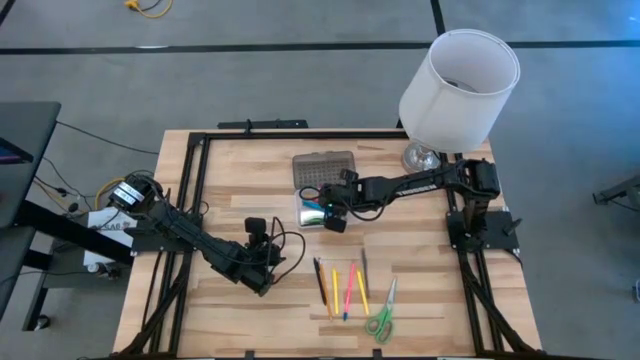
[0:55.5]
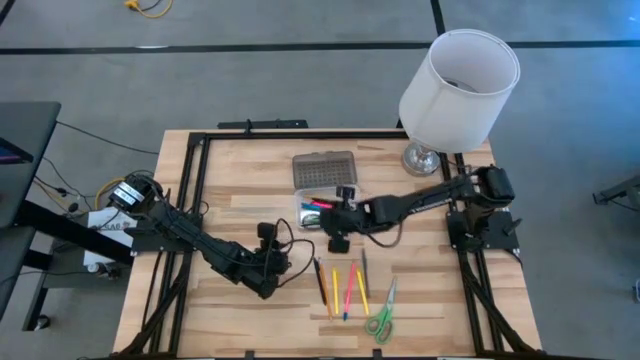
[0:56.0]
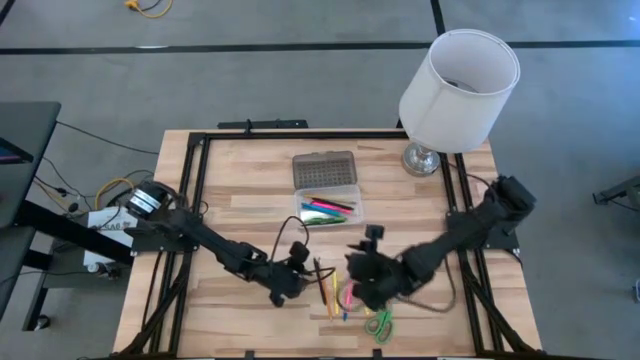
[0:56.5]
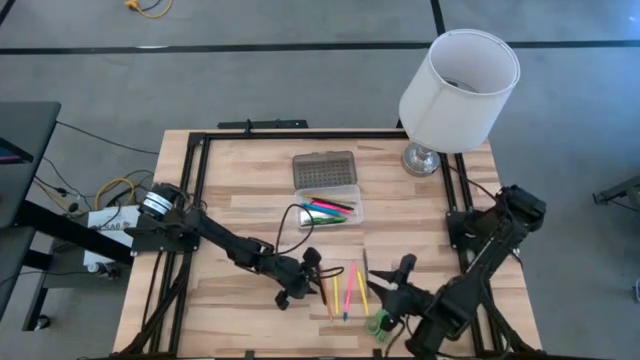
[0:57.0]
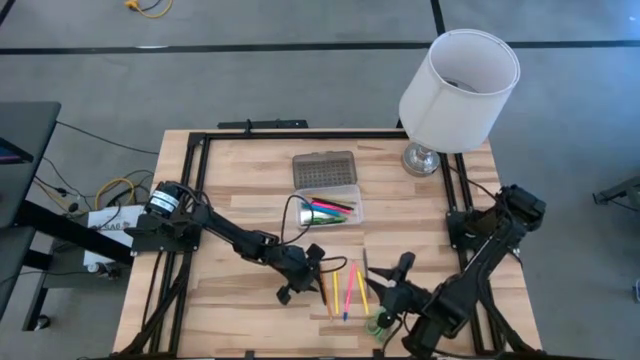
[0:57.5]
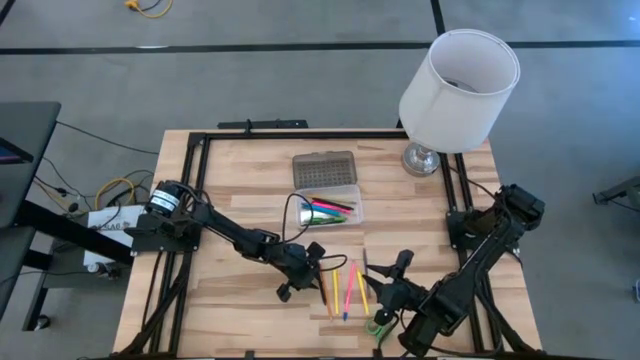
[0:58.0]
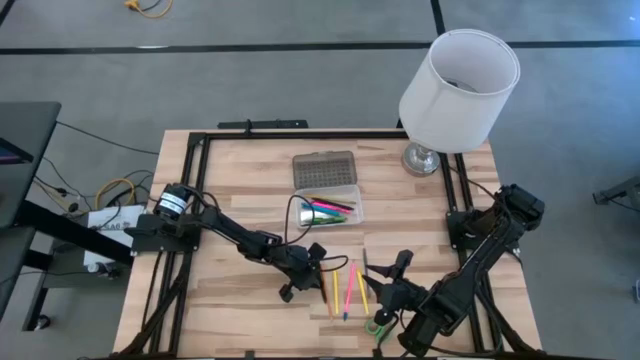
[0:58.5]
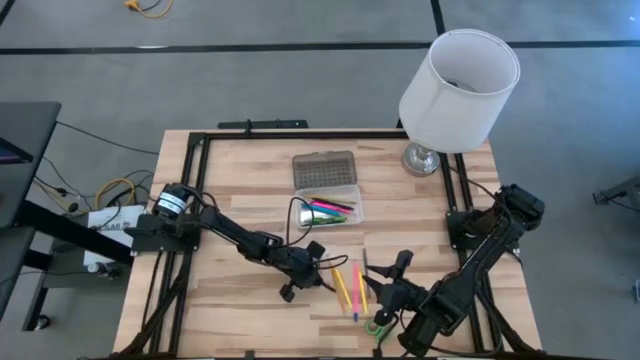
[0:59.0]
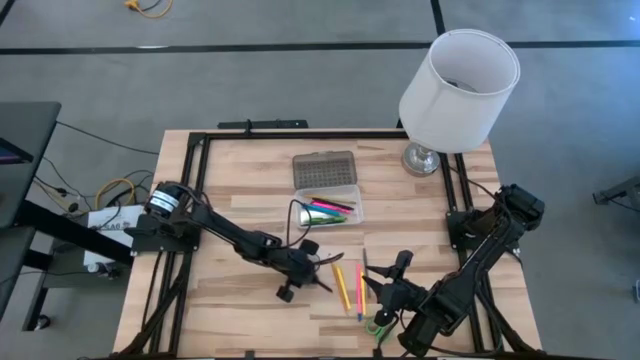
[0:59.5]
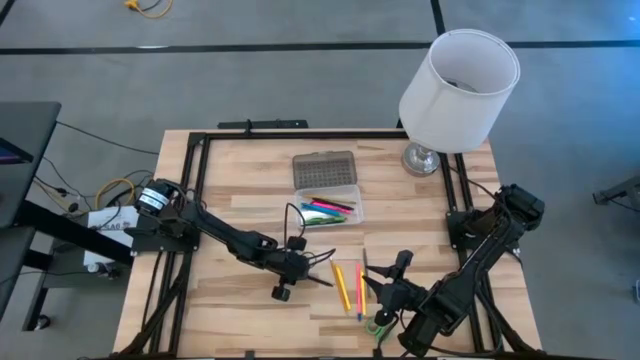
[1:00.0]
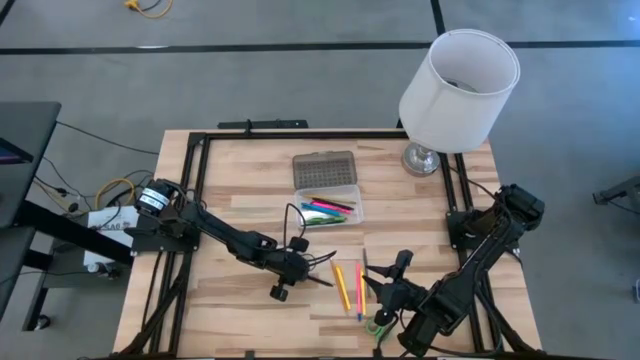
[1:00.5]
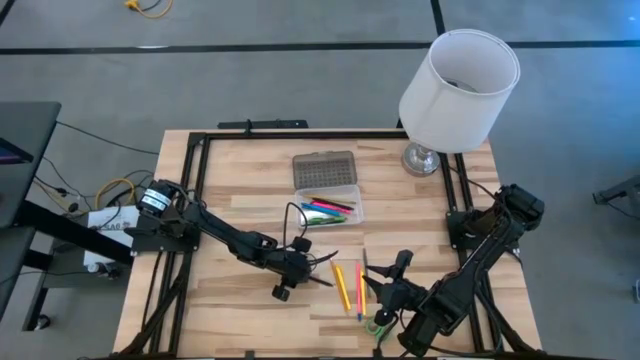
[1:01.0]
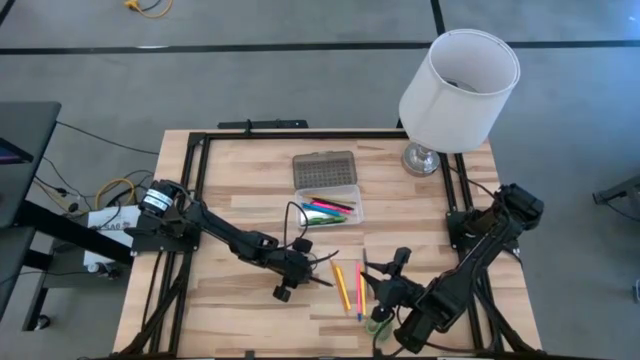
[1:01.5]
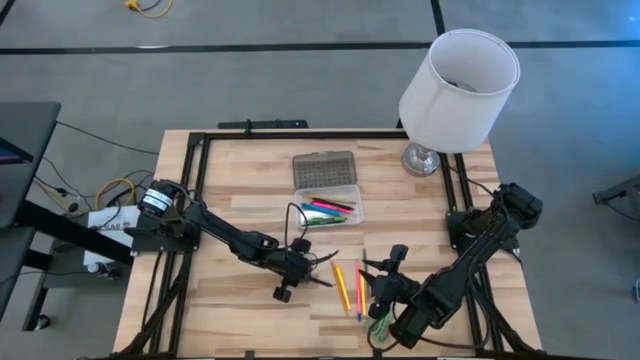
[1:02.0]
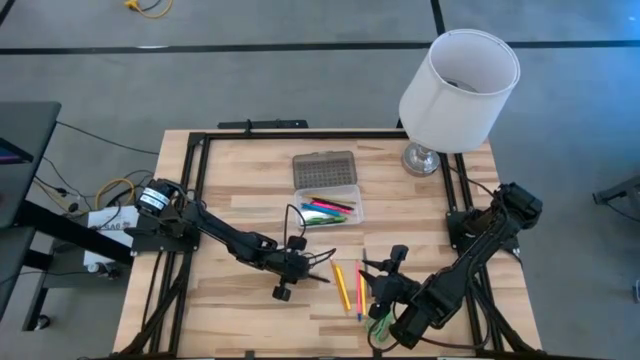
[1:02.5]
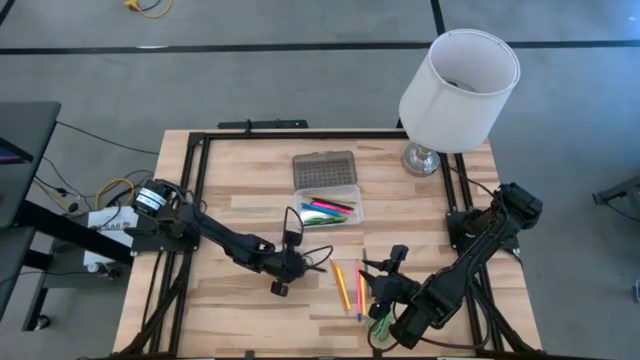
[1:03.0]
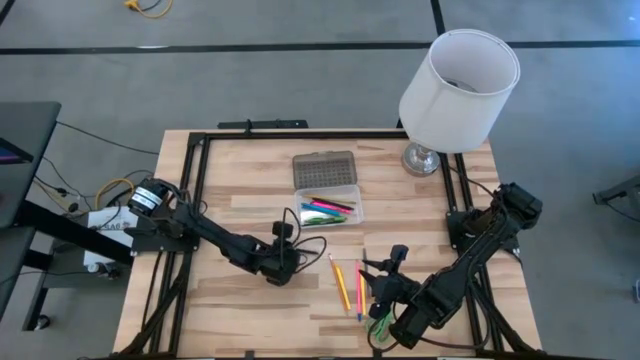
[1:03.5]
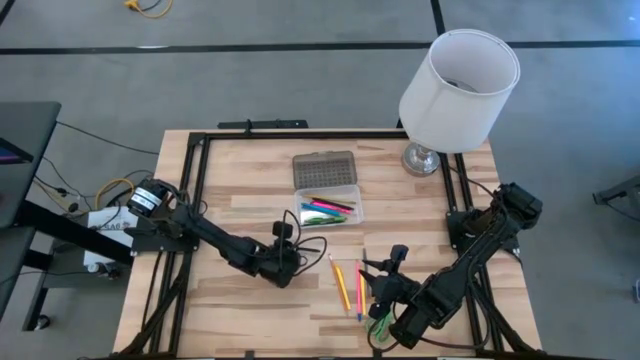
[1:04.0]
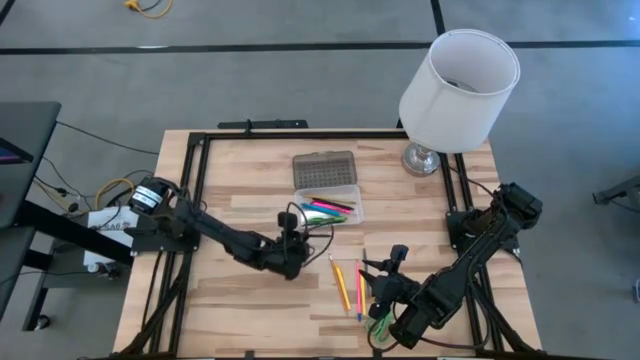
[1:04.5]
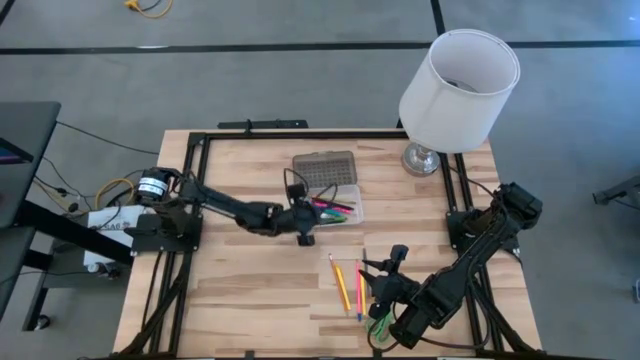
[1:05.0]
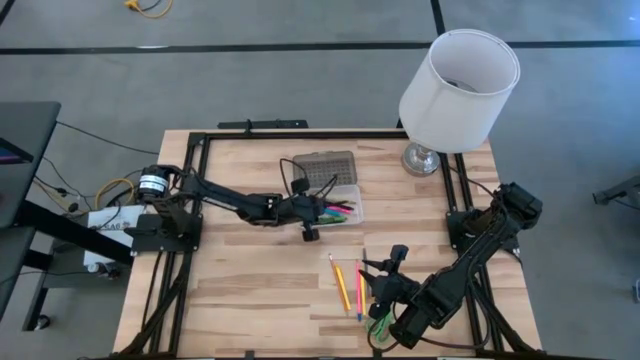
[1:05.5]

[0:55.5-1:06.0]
Task: Pick & place school supplies into a supply box
Put the black pen into the gray supply box

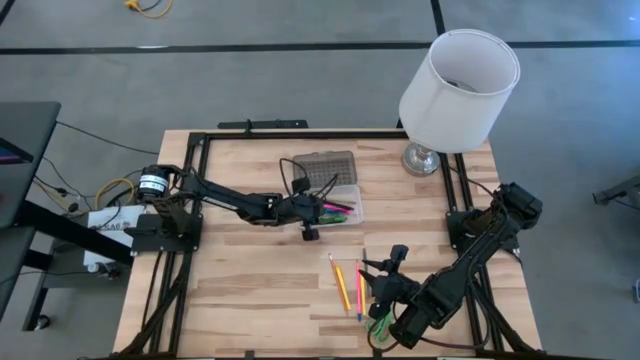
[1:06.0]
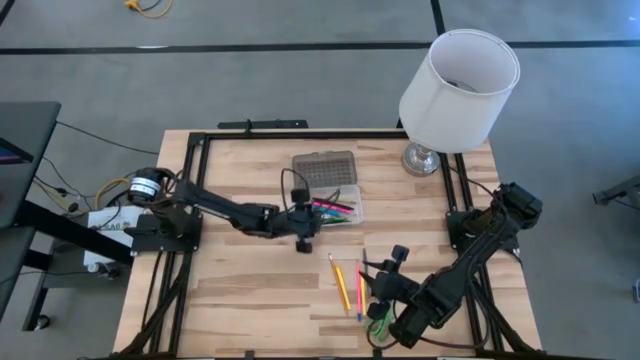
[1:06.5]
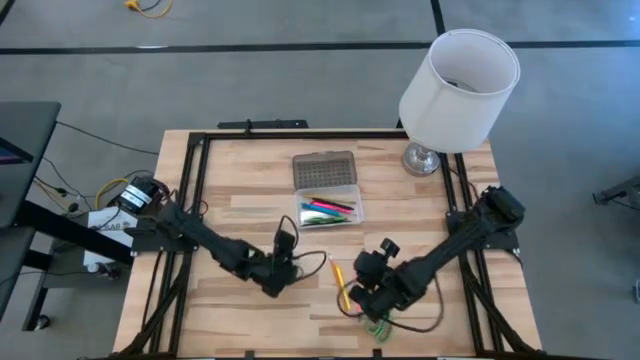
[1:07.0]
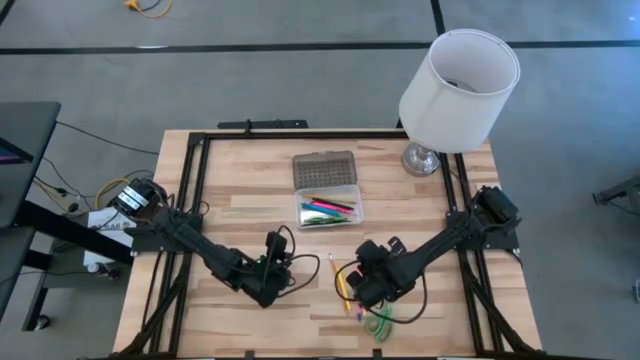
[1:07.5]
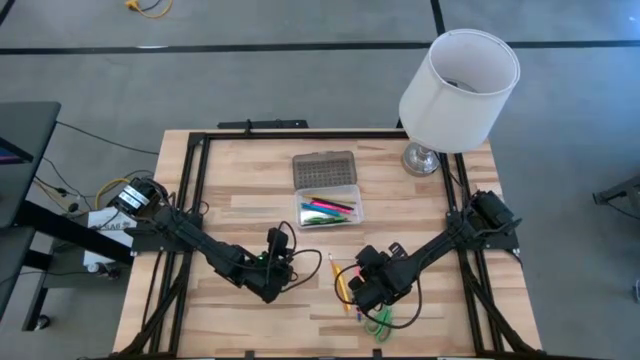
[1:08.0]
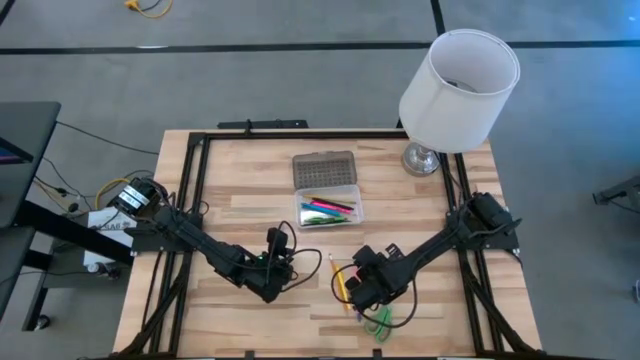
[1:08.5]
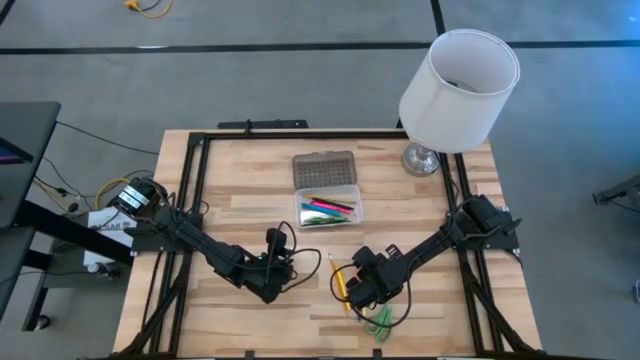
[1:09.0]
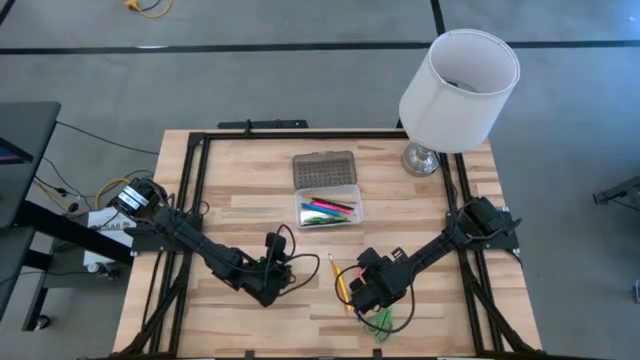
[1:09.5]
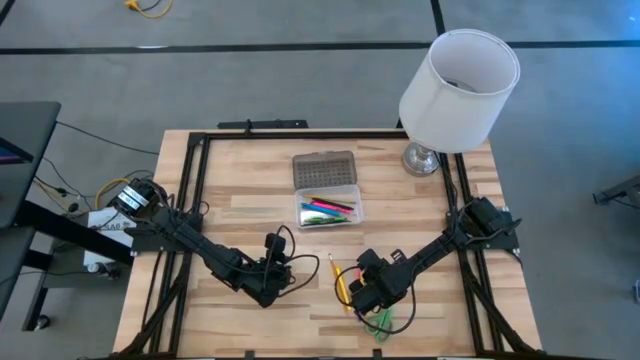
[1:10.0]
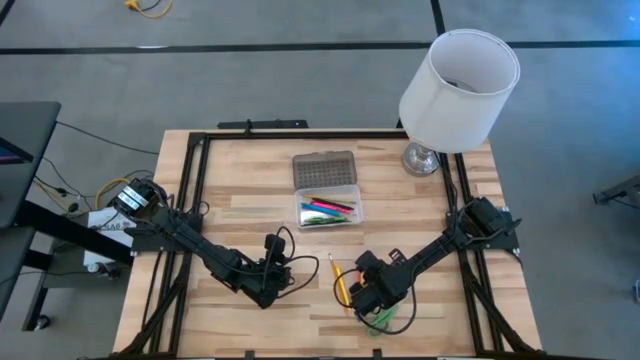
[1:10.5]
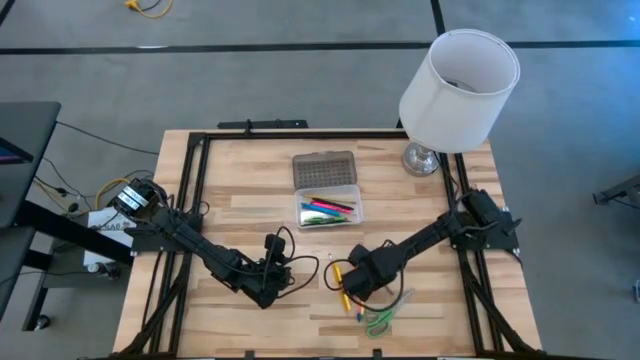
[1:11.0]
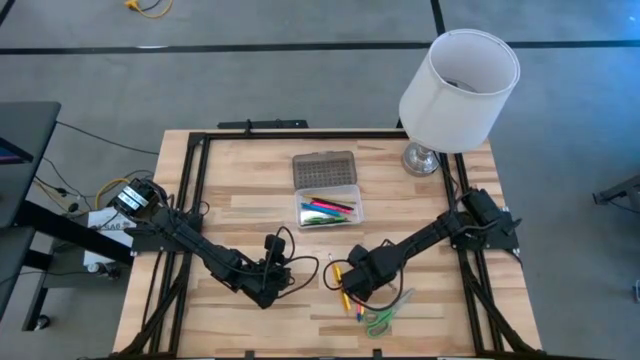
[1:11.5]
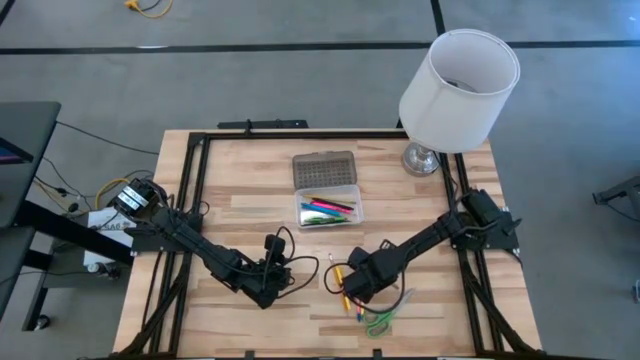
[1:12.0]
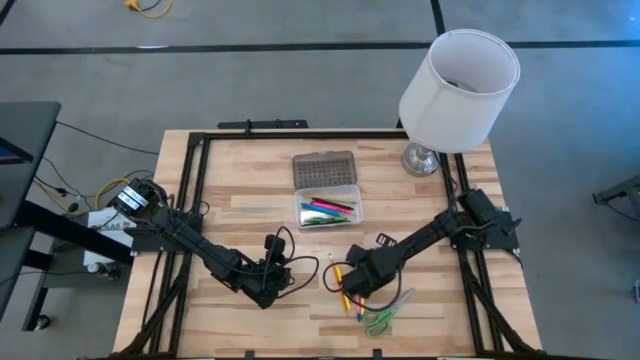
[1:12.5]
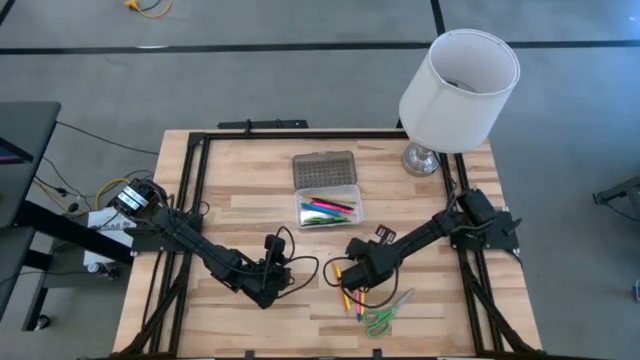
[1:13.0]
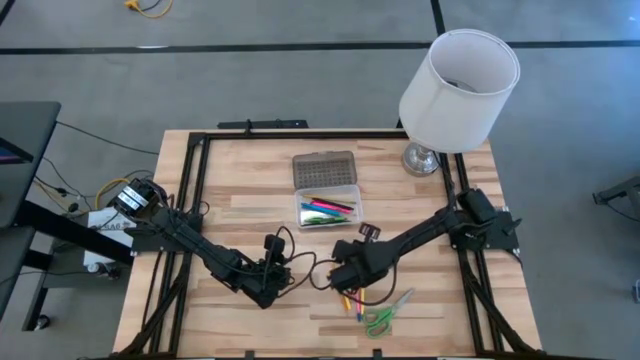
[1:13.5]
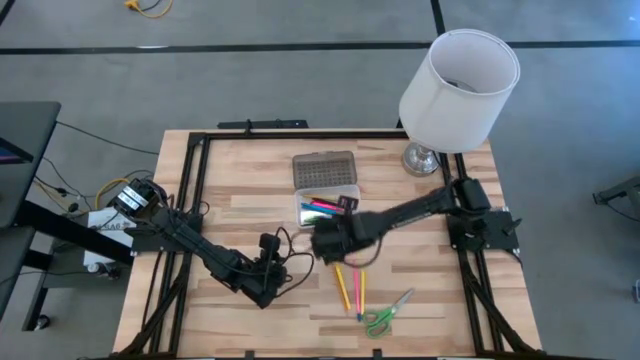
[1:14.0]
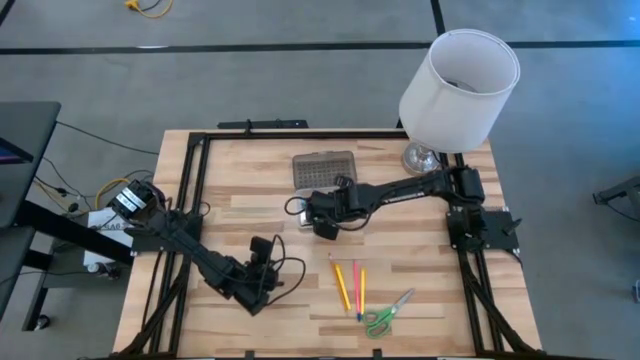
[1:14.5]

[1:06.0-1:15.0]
Put the gray pen into the gray supply box

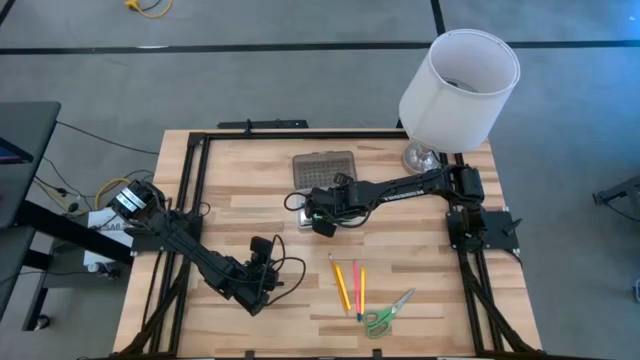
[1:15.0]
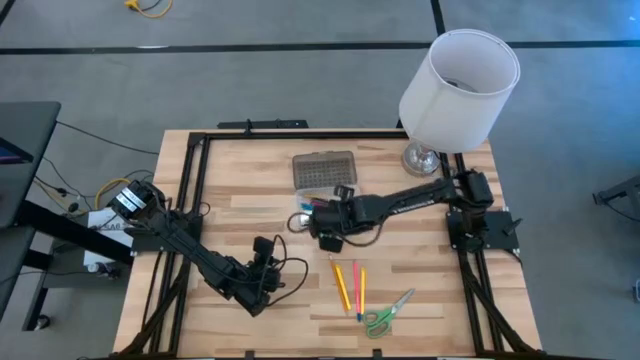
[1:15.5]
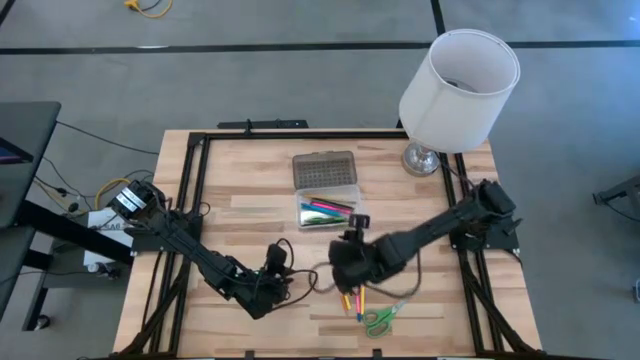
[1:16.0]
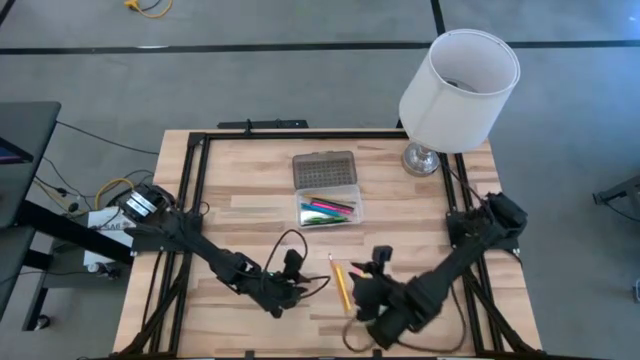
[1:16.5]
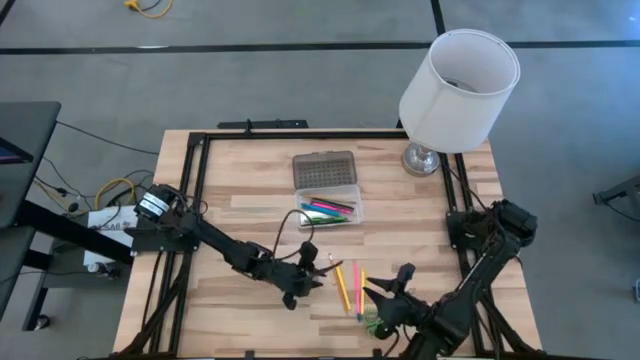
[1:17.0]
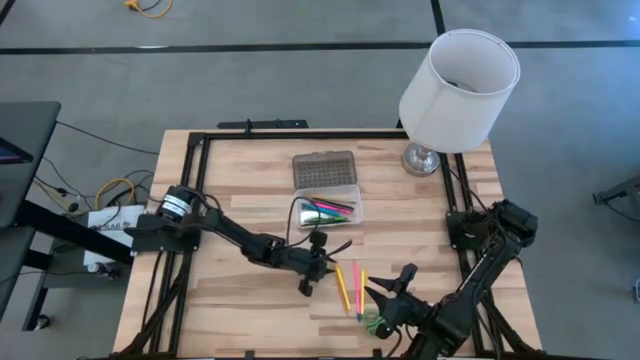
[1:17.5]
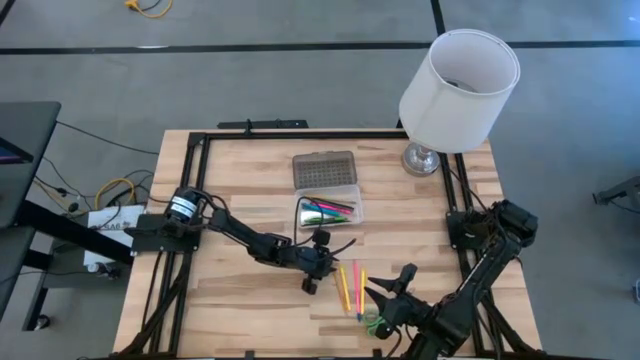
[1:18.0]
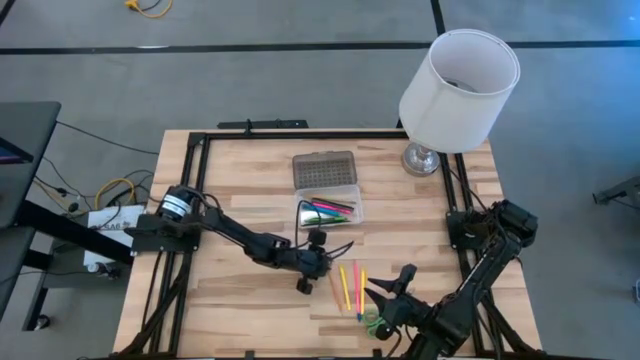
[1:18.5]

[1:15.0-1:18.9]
Put the pencil into the gray supply box
